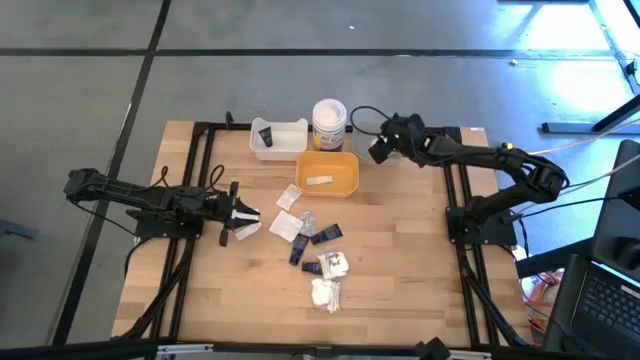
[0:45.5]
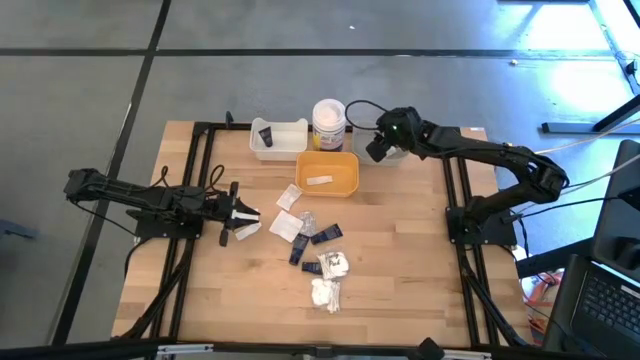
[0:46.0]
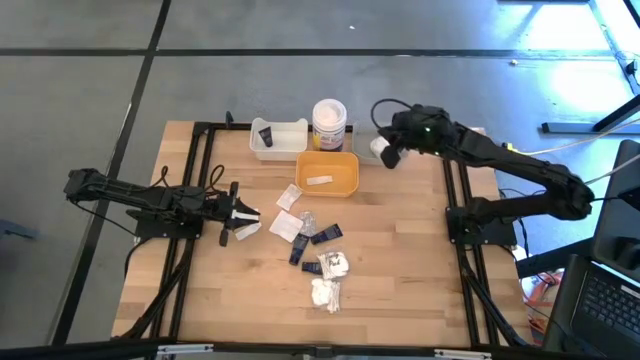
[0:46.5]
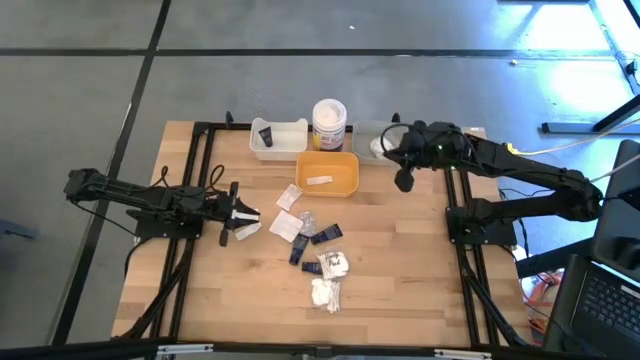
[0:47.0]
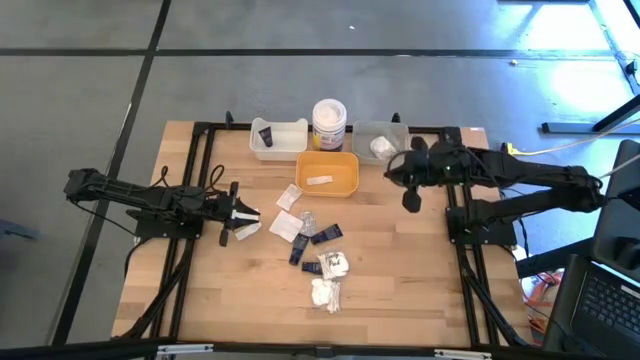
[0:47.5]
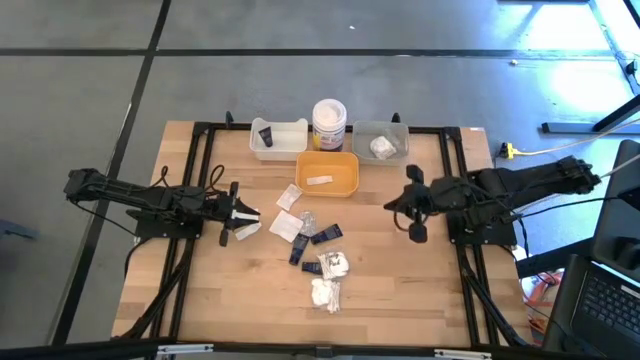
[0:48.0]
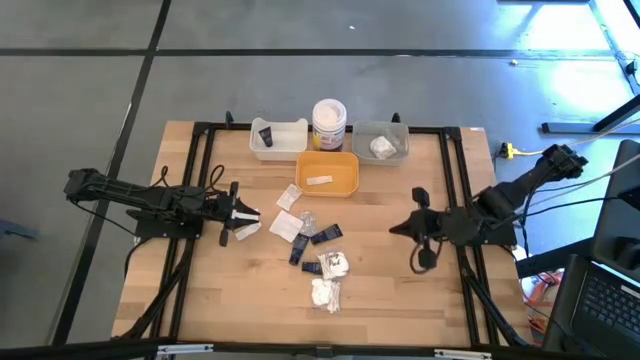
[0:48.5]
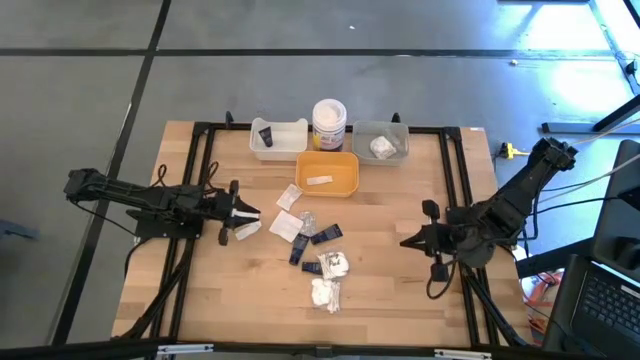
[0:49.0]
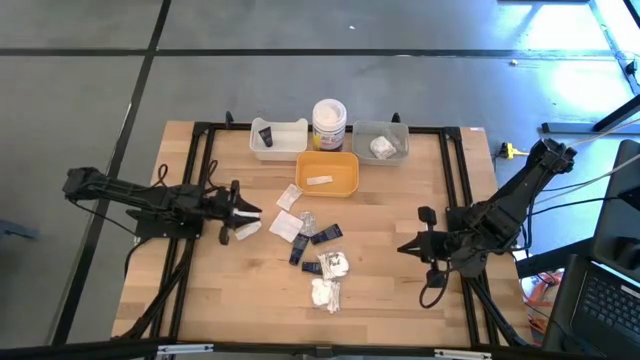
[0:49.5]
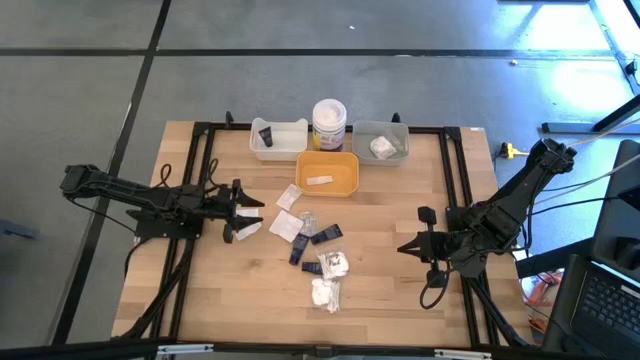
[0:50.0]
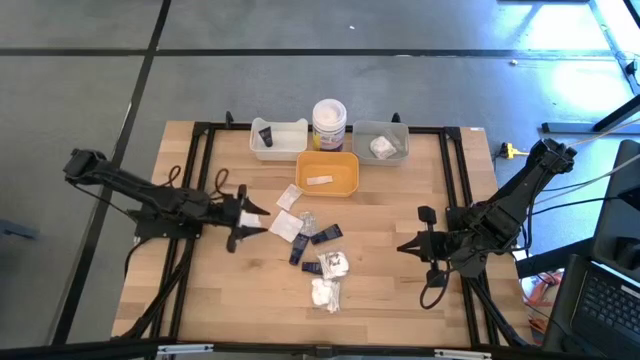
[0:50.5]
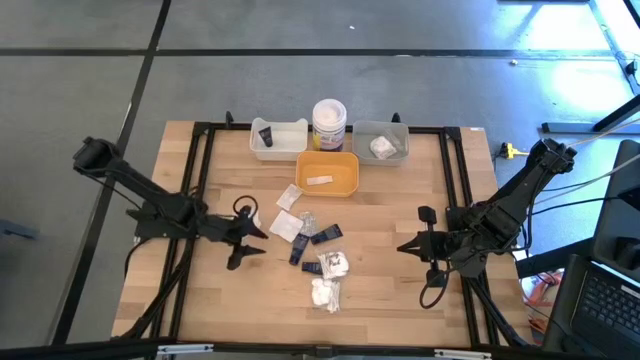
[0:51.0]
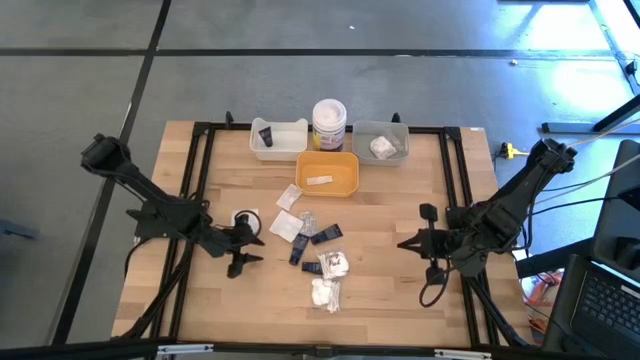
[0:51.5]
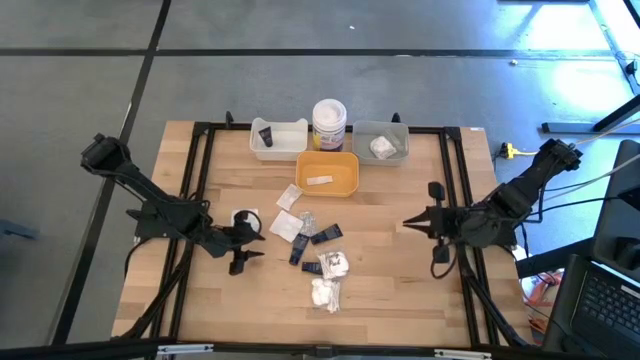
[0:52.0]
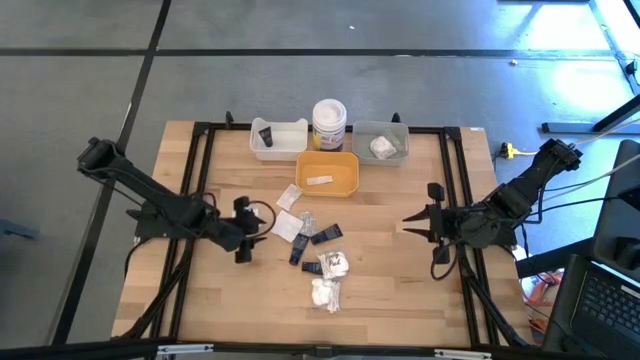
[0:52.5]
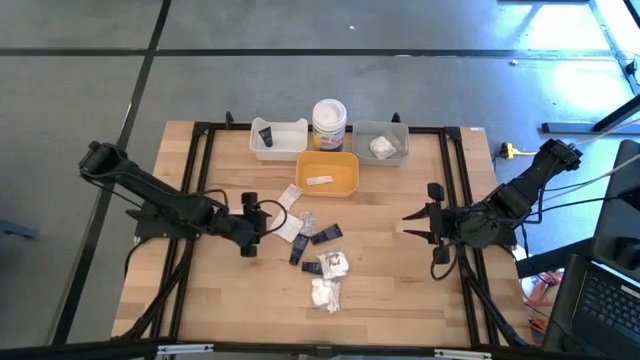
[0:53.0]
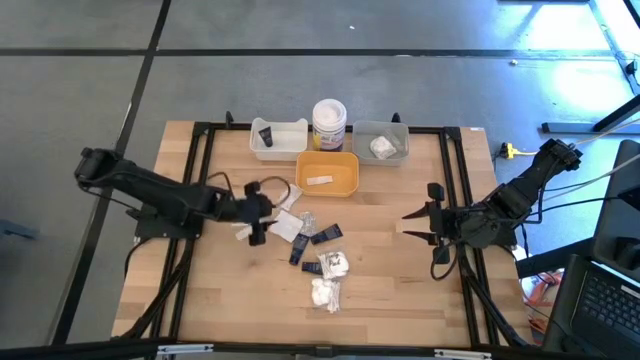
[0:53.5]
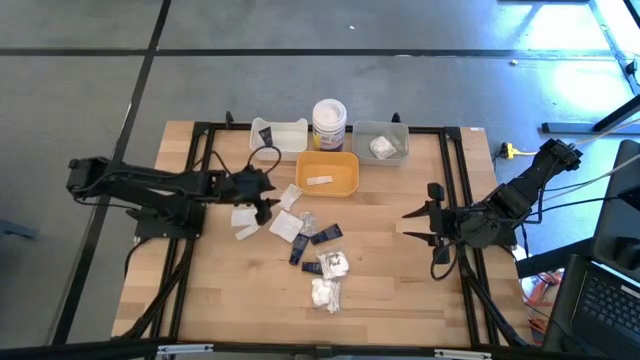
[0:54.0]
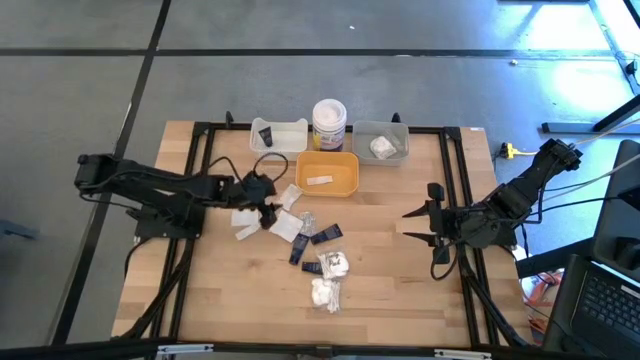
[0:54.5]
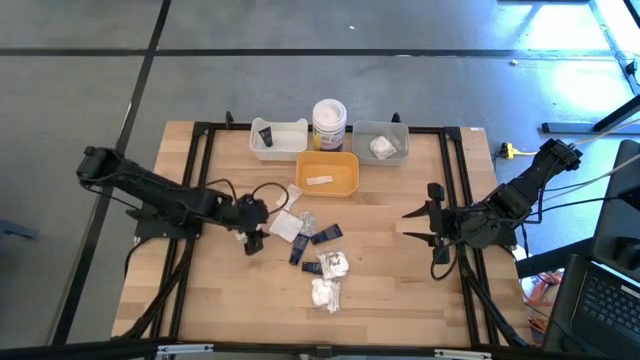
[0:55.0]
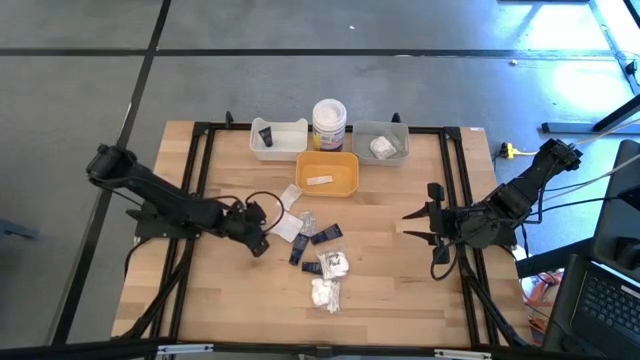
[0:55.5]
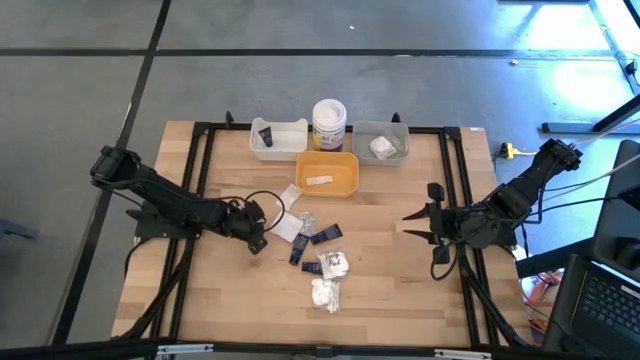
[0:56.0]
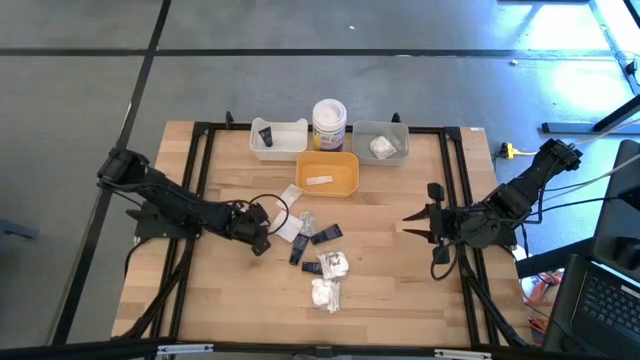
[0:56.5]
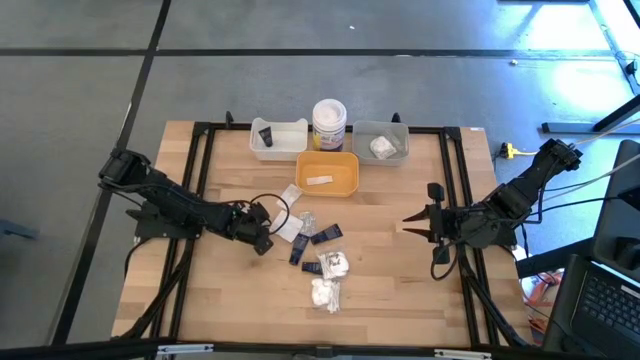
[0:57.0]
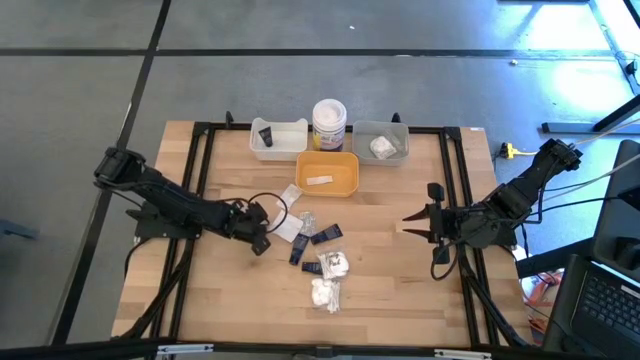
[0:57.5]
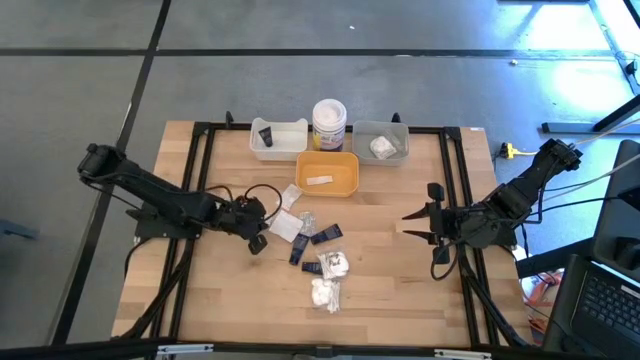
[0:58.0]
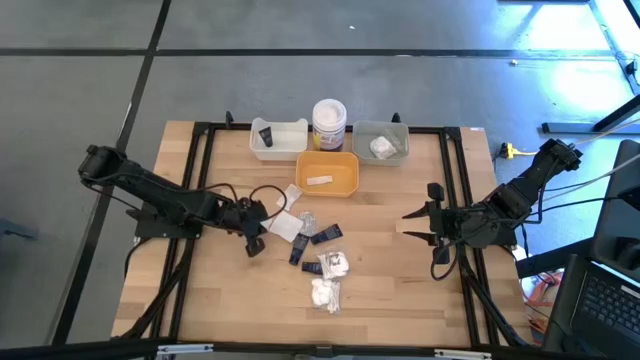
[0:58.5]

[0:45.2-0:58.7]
Task: Pick & Place Travel size toiletries
Put the white bandage into the yellow bin

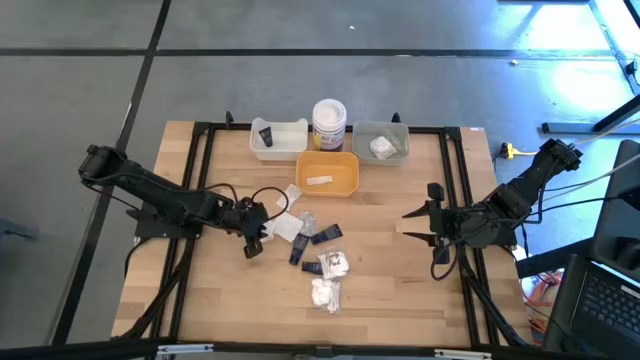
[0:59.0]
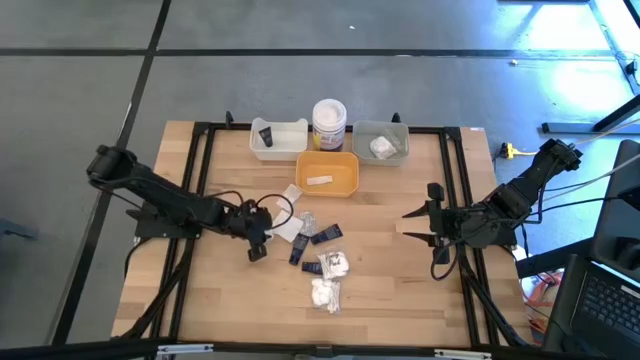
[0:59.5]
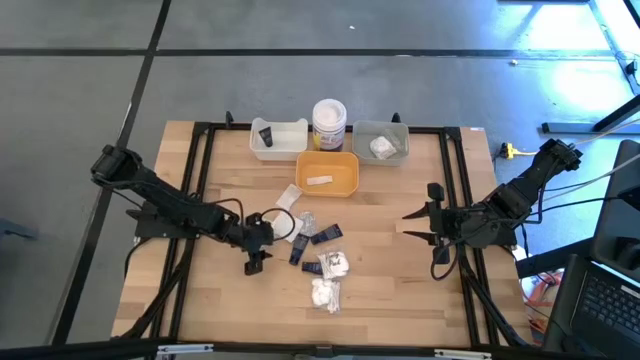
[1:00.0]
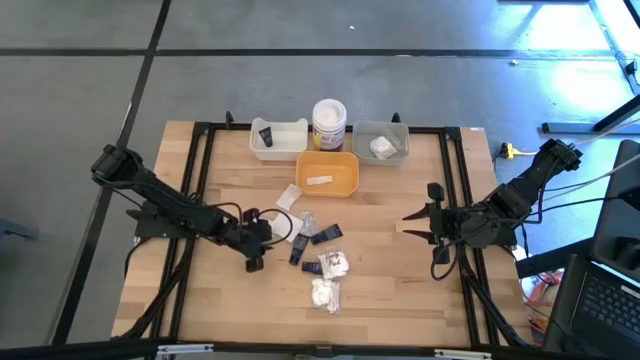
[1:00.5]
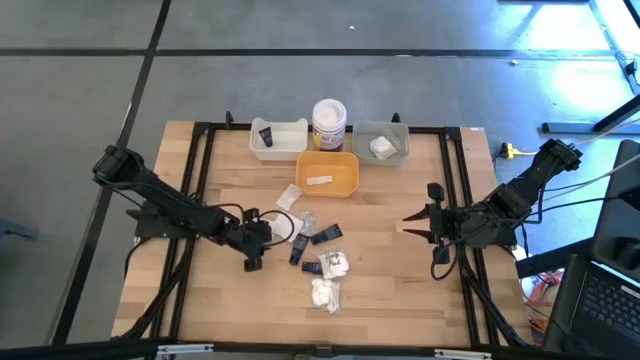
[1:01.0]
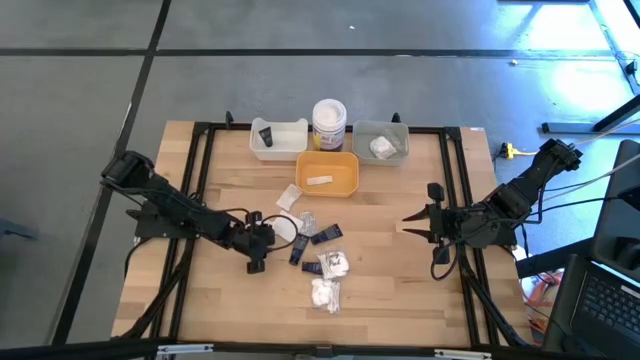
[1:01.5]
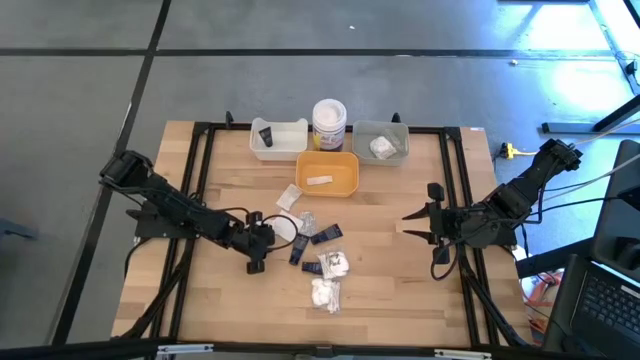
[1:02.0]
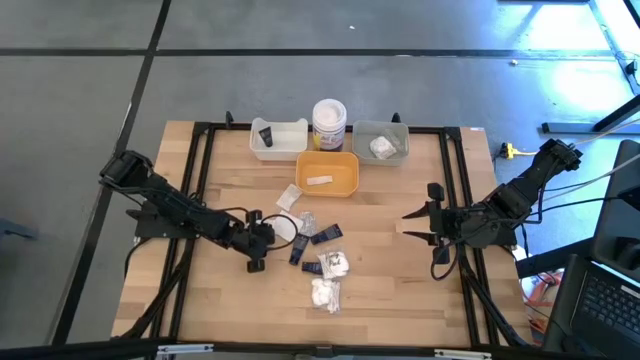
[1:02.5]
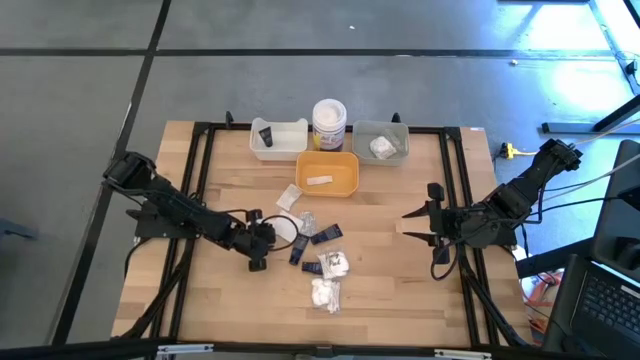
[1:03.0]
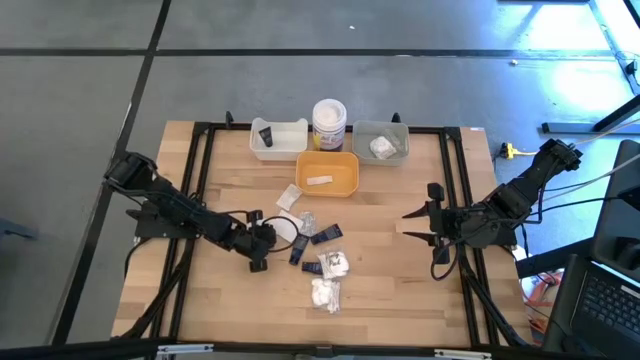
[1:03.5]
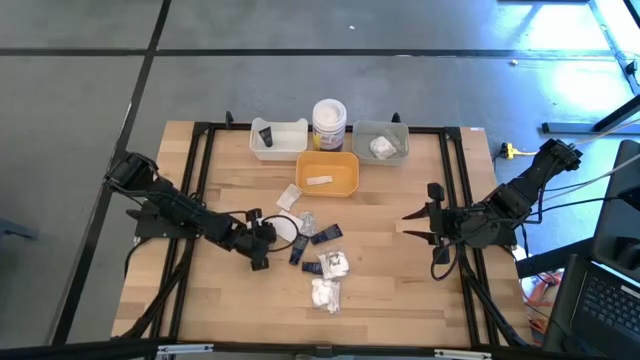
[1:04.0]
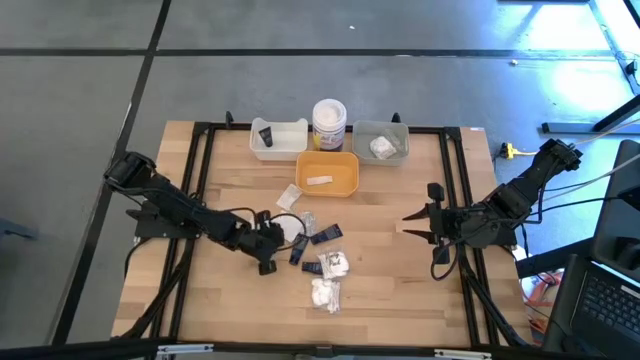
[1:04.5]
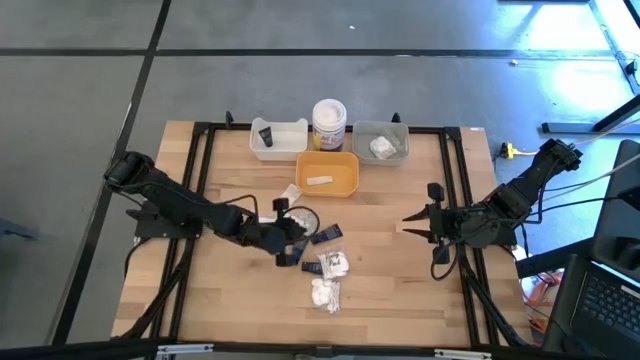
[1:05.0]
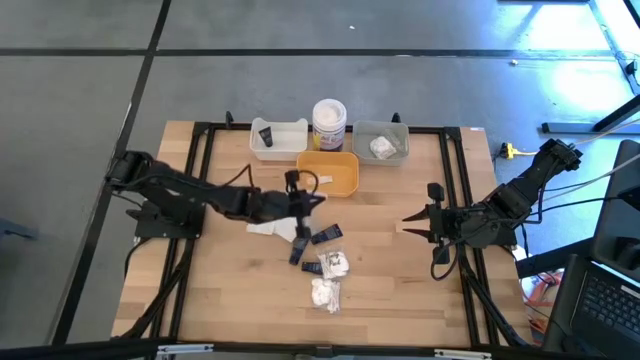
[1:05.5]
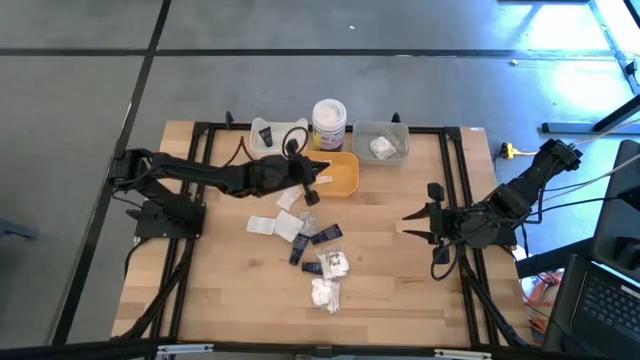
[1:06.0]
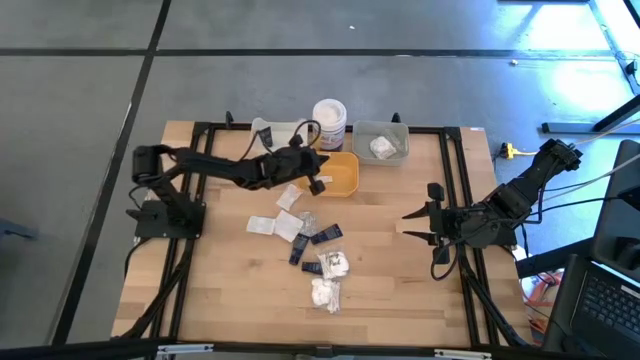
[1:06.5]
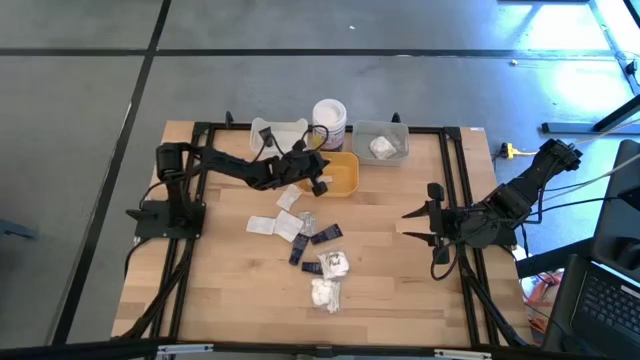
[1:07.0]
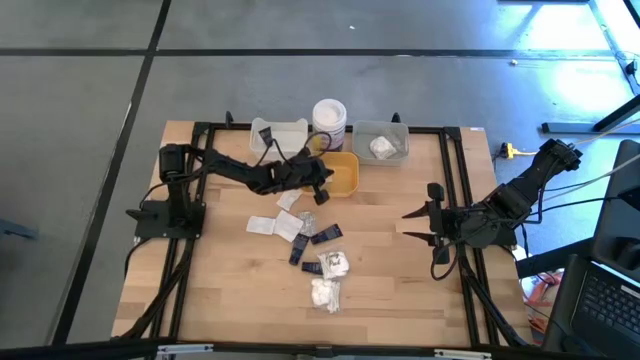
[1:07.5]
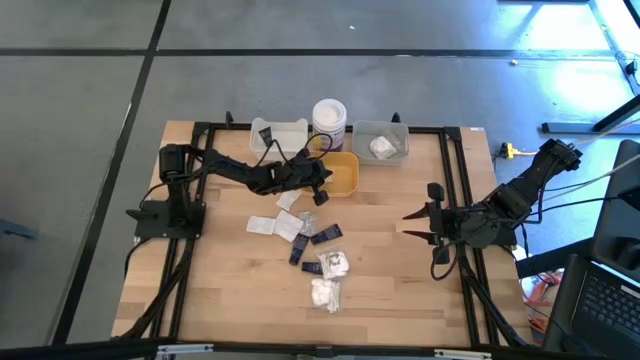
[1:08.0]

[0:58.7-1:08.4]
Put the white bandage into the yellow bin
